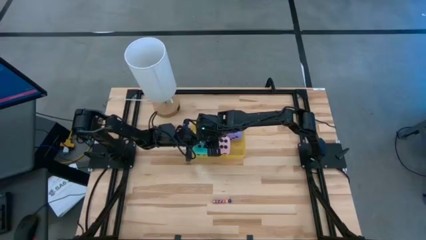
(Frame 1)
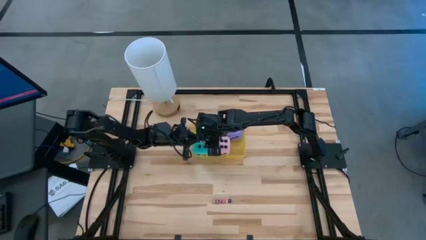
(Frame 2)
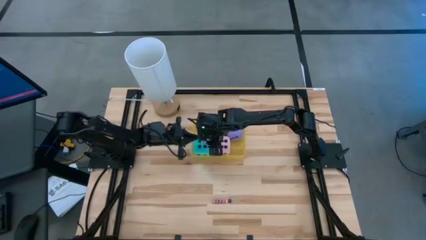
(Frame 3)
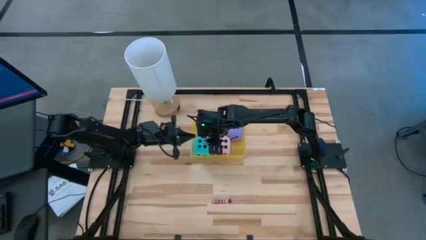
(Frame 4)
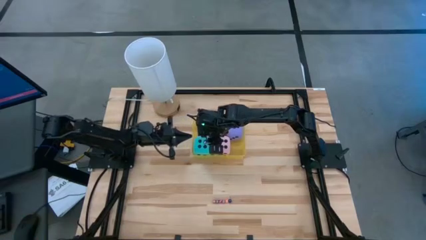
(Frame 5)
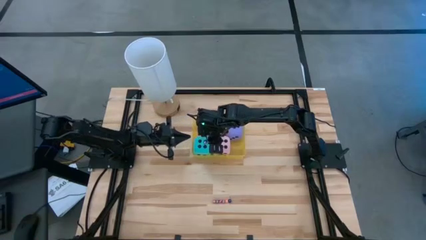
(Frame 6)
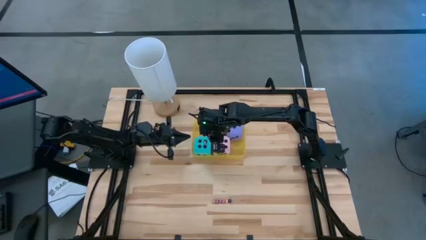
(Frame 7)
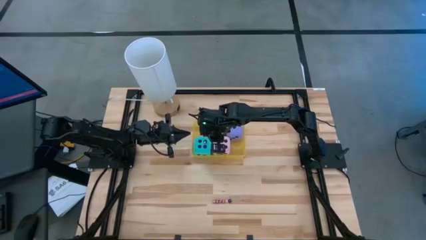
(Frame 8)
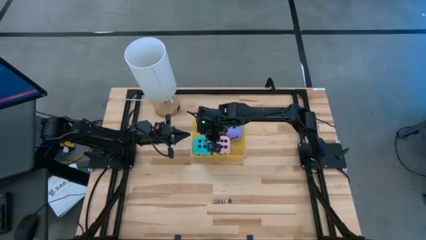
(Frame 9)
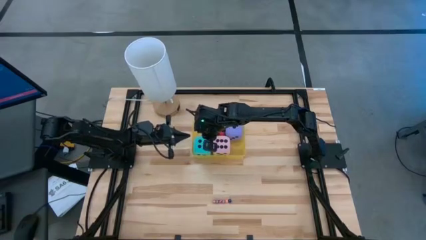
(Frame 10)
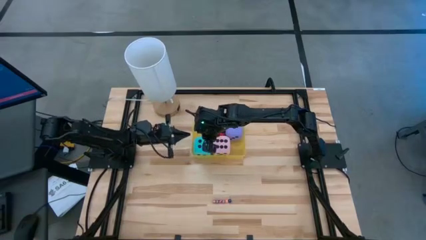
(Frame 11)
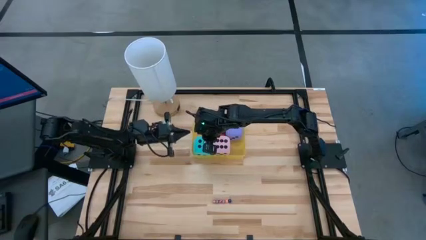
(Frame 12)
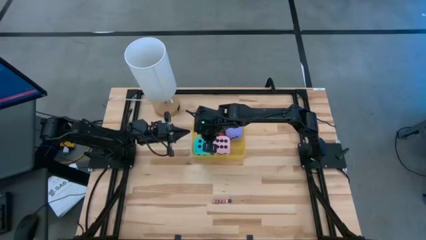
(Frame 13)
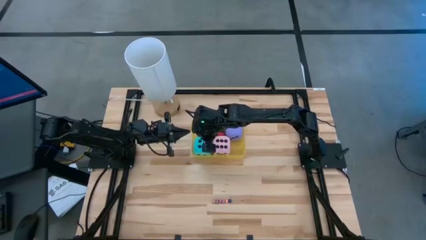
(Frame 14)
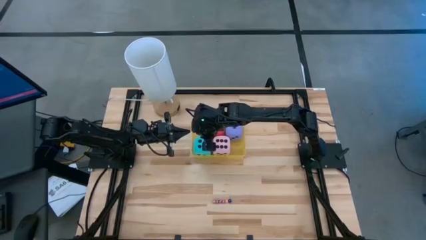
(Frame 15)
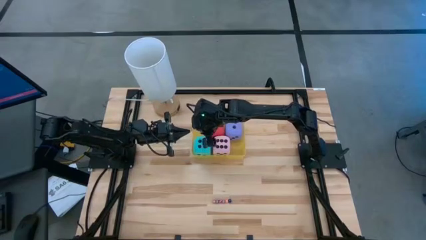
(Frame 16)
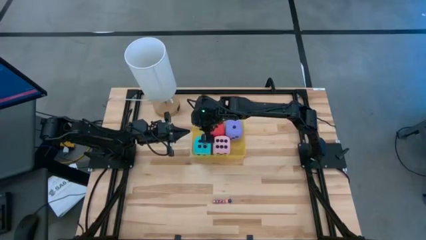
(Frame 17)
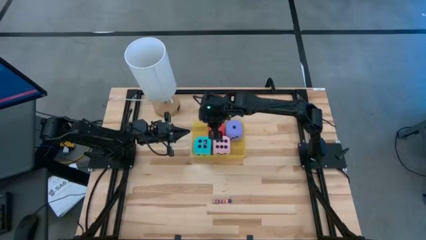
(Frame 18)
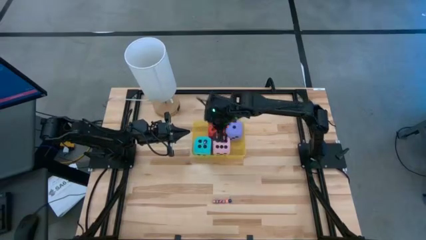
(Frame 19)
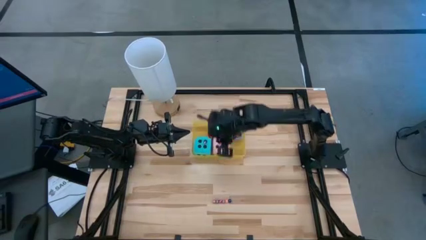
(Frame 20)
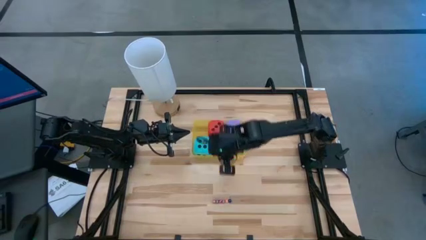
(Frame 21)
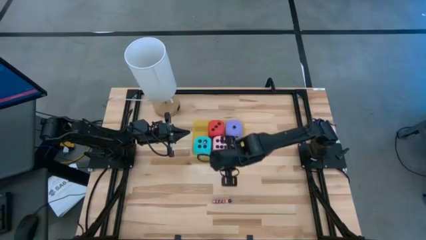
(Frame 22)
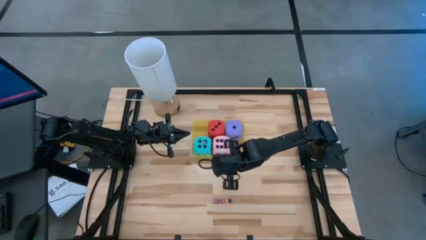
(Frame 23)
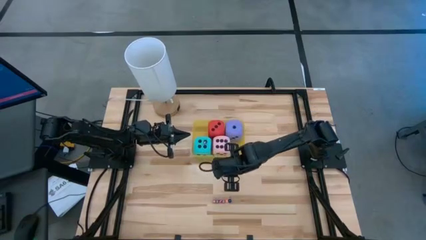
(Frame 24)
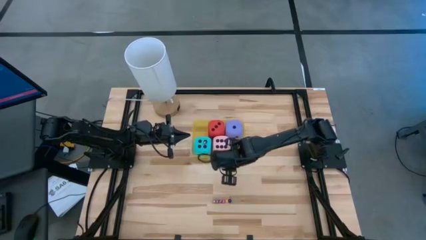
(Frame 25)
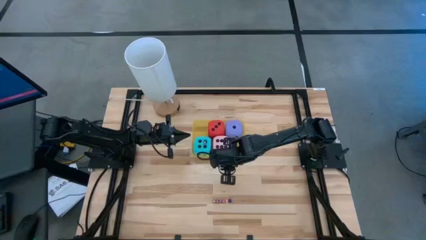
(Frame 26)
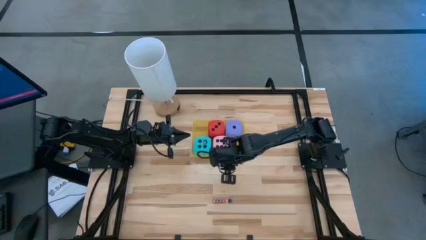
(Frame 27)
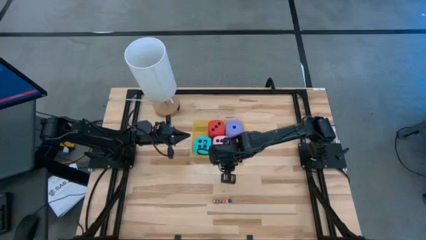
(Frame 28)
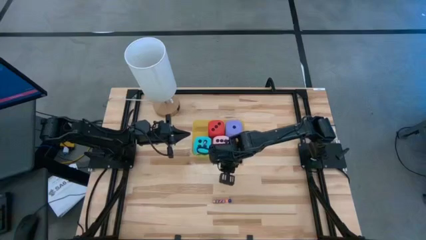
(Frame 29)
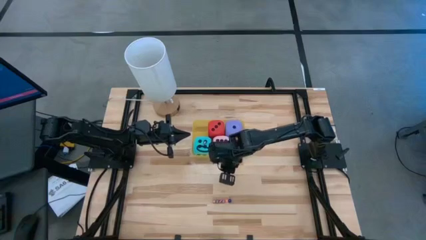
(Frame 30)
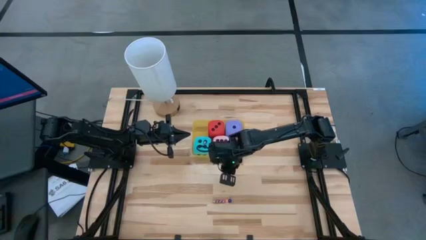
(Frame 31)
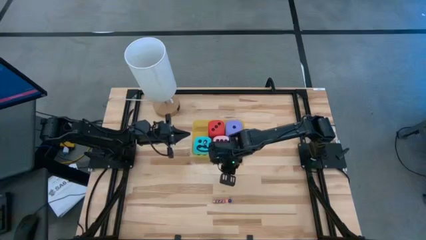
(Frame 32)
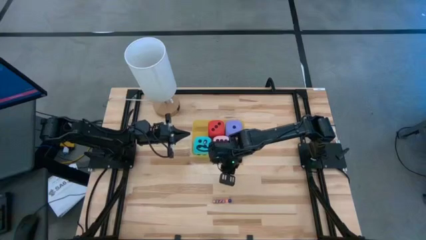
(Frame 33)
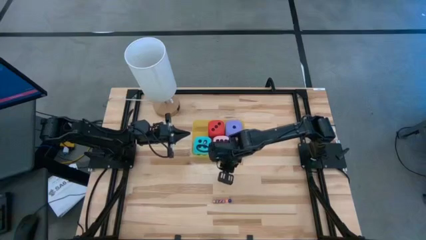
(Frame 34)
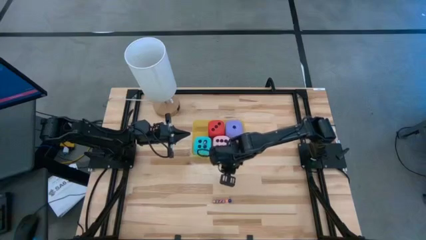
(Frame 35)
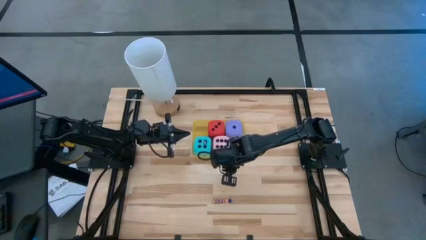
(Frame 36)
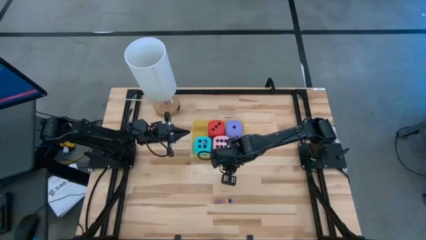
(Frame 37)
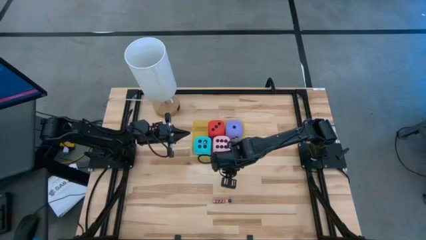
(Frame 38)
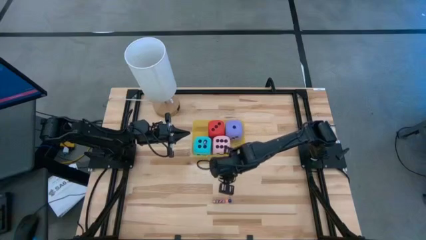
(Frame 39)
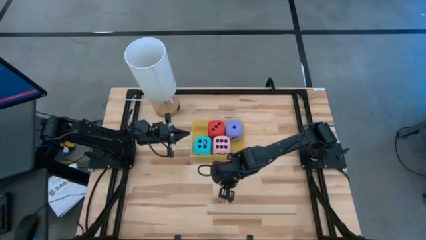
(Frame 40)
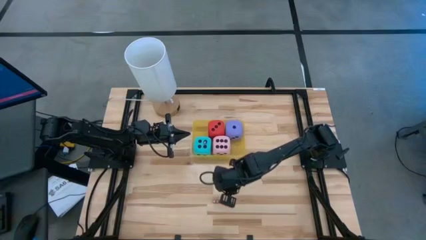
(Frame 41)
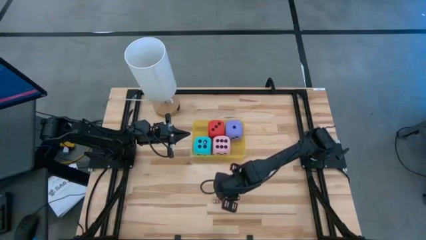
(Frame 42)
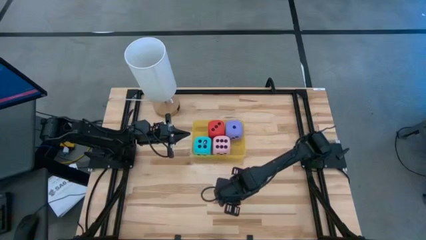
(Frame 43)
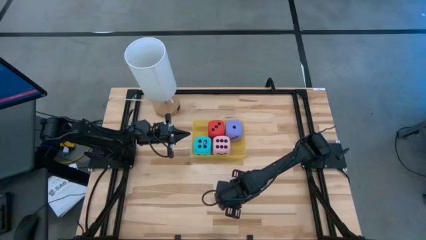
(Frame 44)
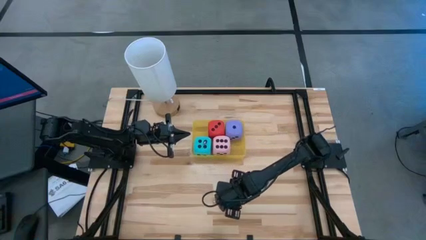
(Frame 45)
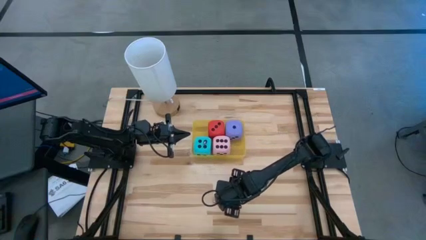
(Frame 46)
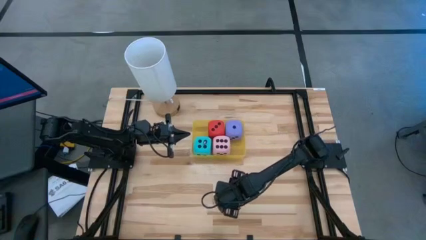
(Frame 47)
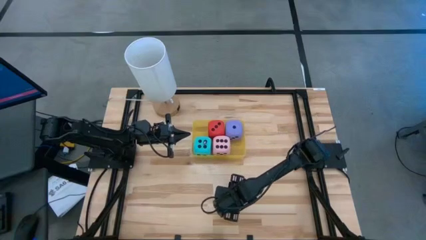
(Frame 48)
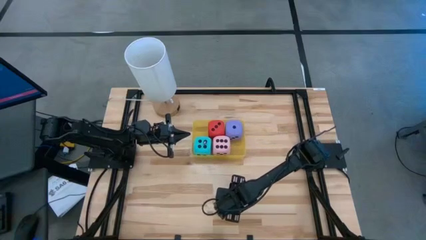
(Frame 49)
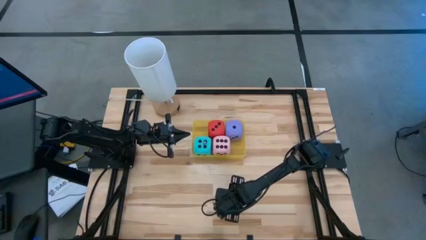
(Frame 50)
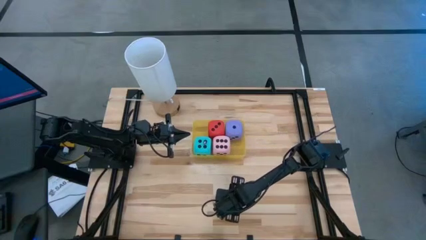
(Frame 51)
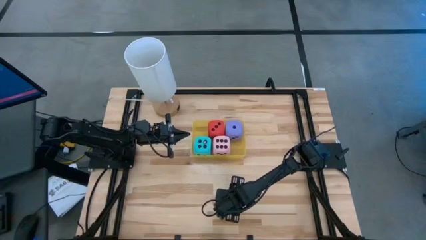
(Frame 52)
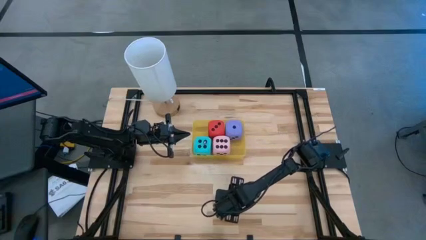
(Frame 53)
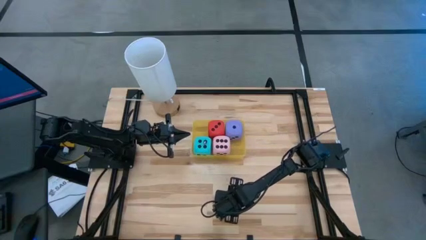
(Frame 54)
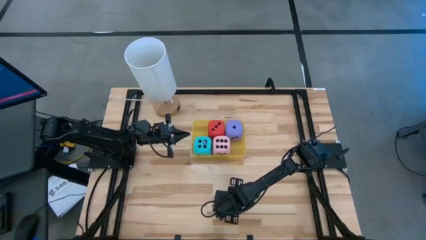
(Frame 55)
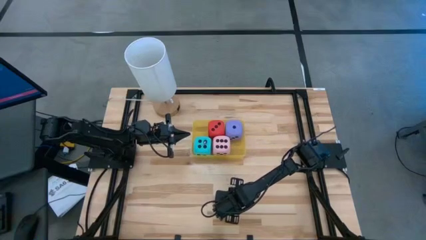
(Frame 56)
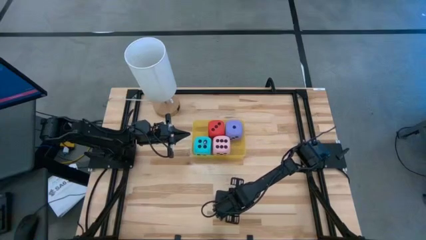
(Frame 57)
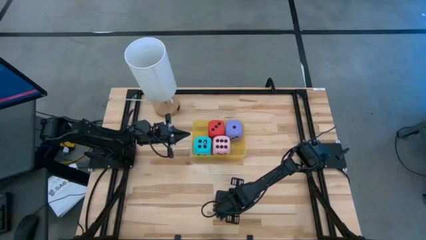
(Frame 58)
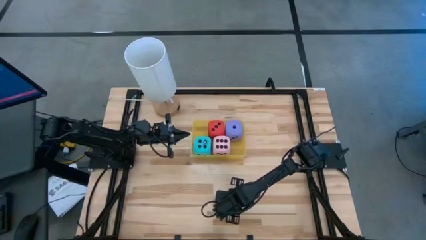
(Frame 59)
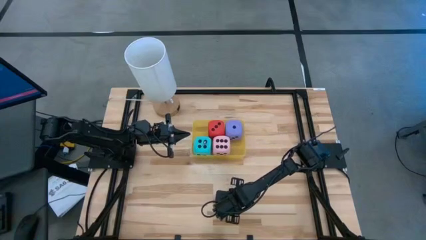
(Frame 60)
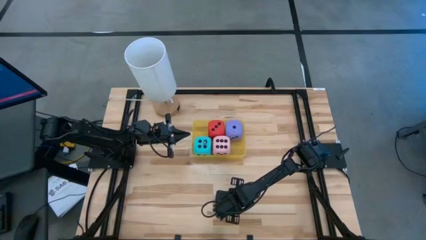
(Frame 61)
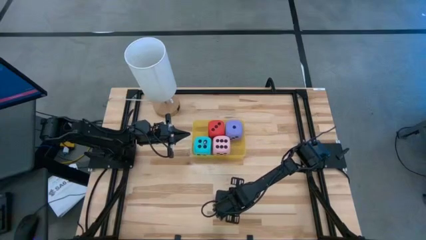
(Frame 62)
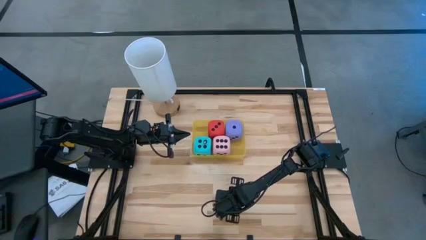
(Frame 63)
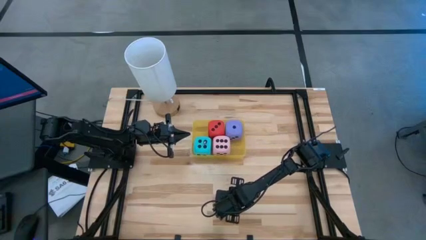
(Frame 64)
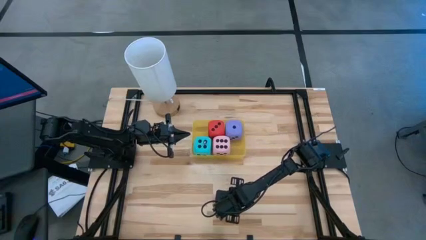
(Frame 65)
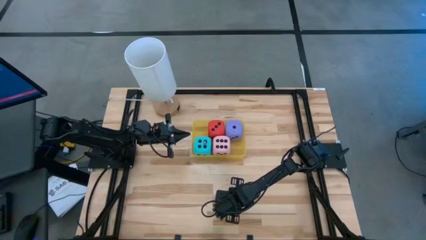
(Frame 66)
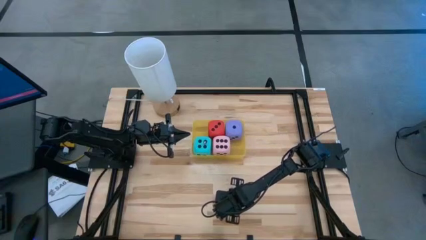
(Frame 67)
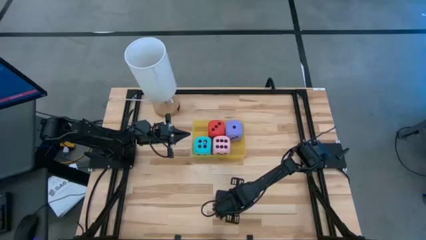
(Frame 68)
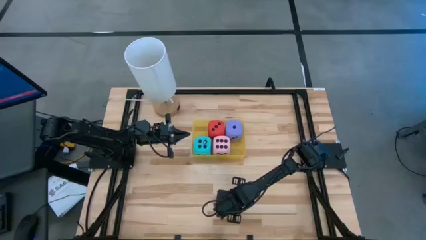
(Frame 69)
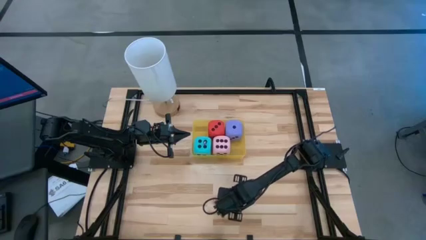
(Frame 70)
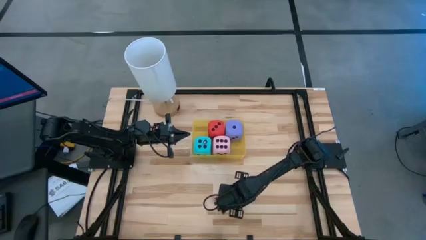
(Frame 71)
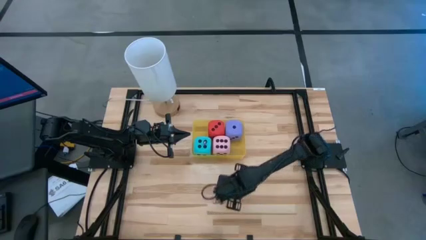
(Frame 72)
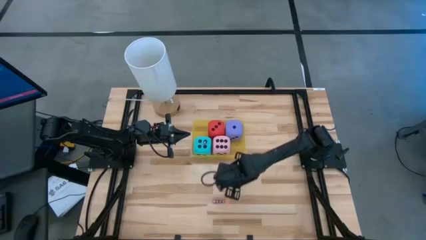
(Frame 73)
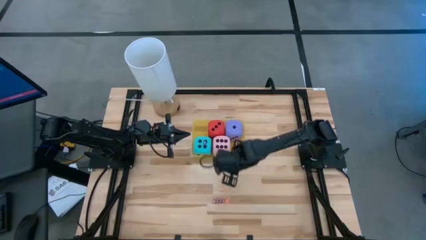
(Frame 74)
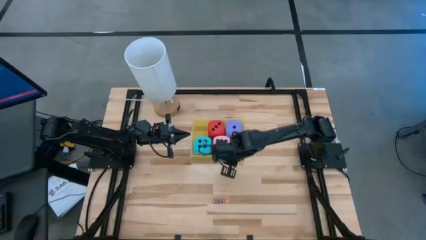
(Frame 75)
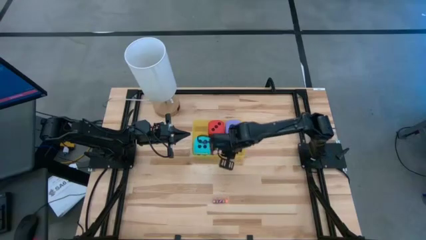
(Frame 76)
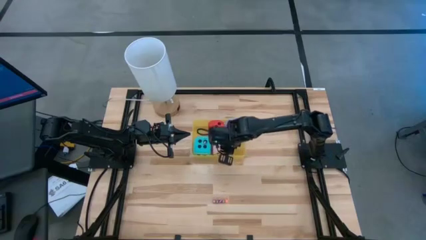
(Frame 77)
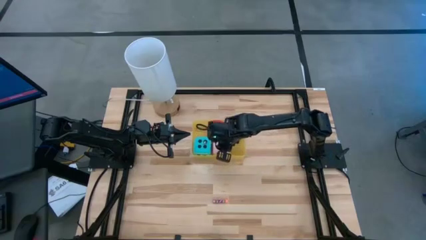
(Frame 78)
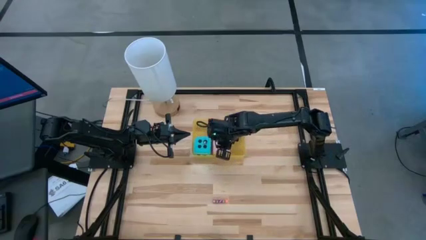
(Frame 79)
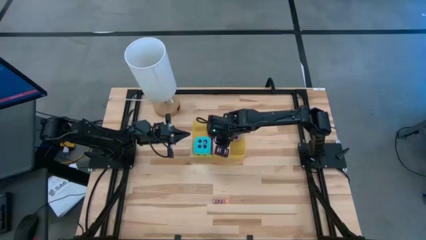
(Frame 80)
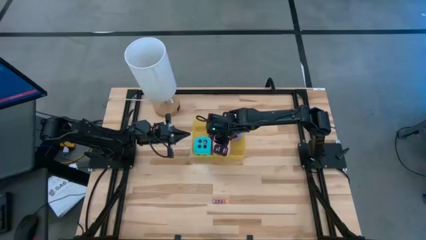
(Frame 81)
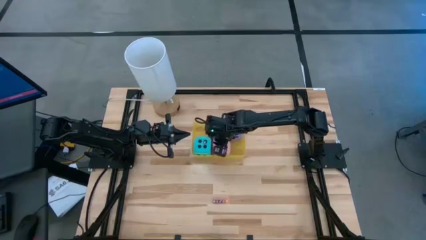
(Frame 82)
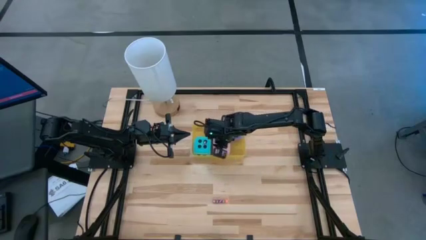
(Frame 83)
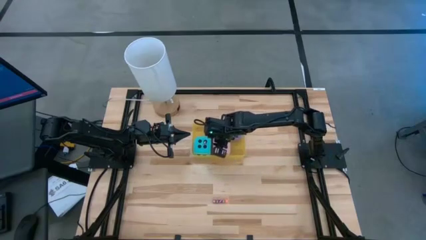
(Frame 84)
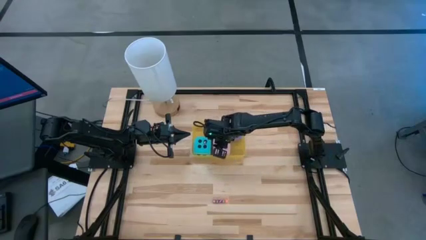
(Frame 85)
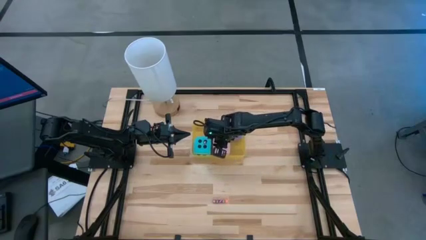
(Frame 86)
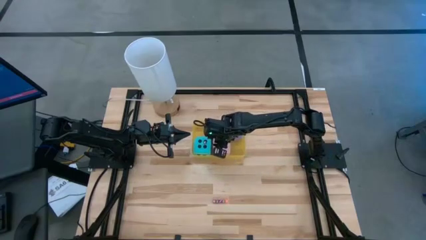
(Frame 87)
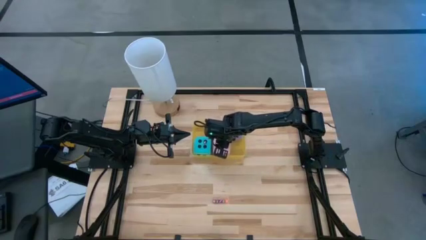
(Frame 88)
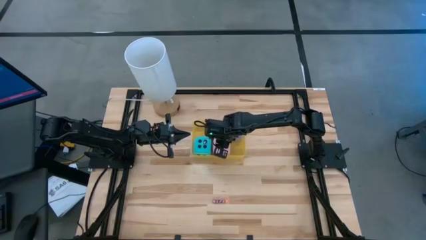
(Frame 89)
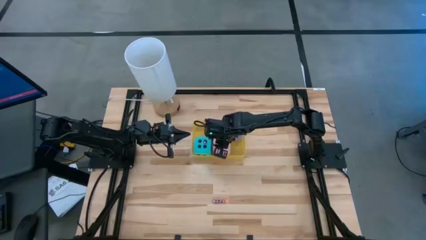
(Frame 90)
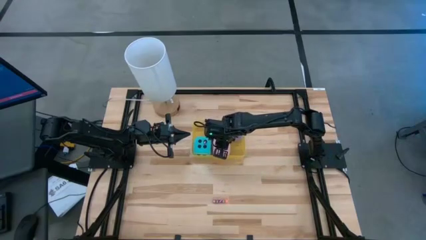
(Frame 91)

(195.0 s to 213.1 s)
Task: Pick & Place Dice
Put the blue dice into the yellow bin
